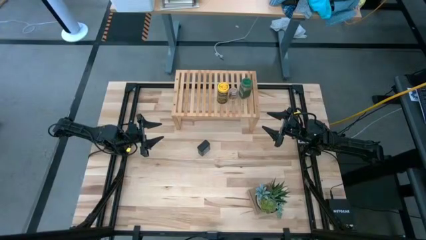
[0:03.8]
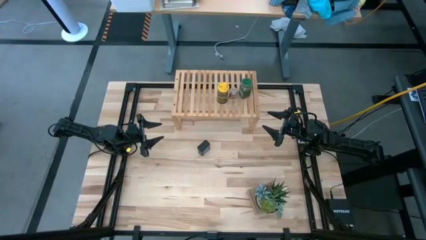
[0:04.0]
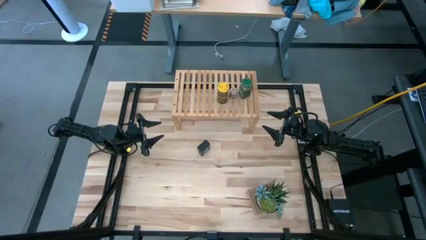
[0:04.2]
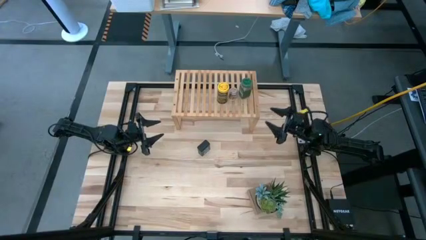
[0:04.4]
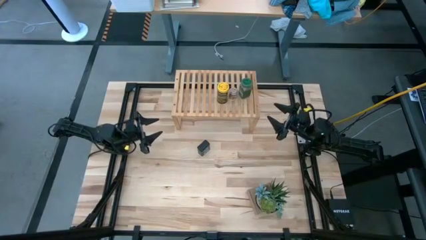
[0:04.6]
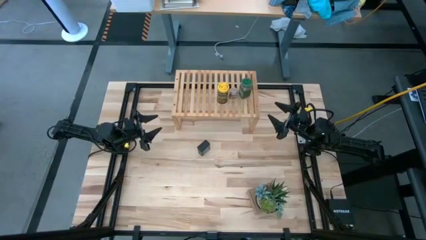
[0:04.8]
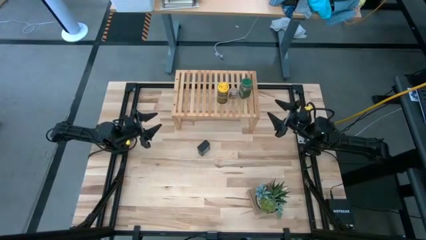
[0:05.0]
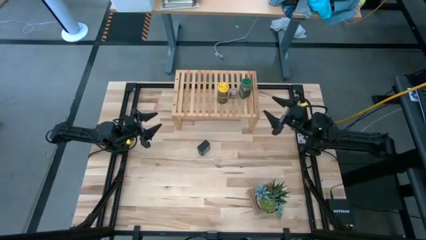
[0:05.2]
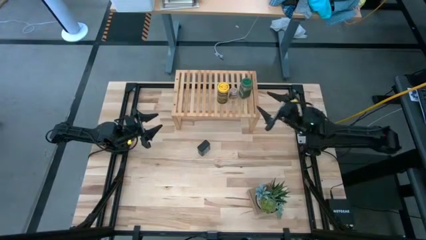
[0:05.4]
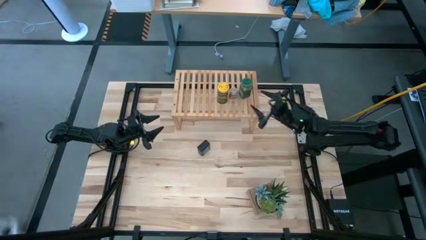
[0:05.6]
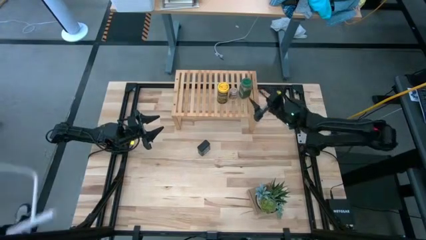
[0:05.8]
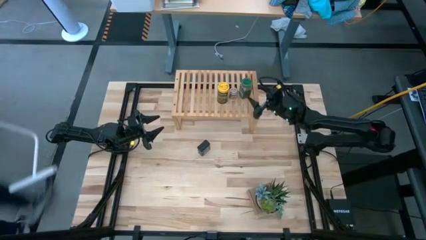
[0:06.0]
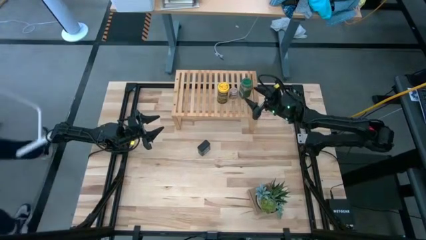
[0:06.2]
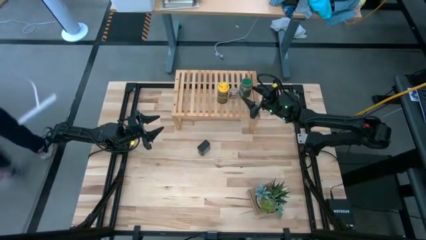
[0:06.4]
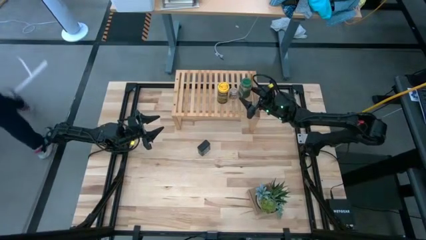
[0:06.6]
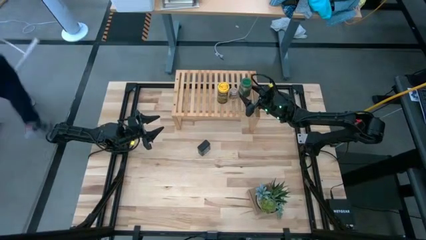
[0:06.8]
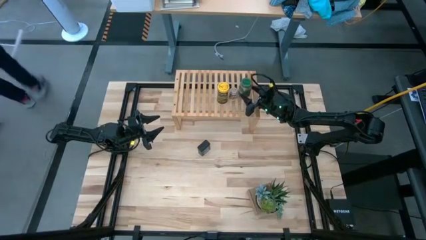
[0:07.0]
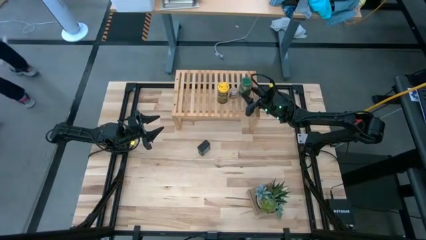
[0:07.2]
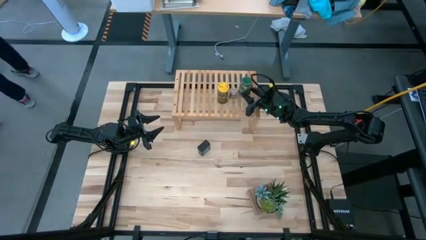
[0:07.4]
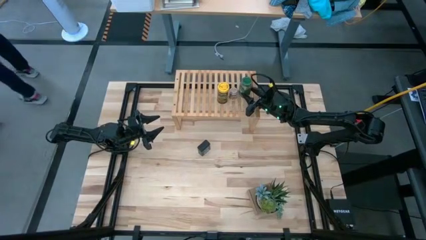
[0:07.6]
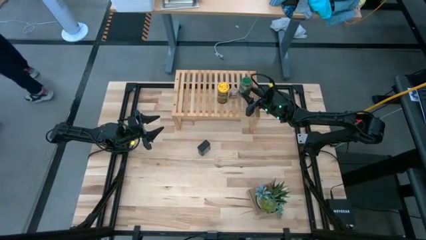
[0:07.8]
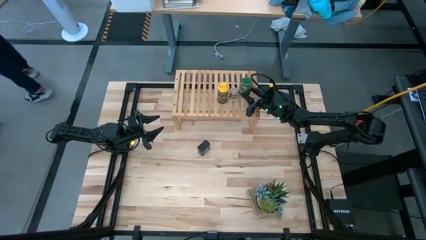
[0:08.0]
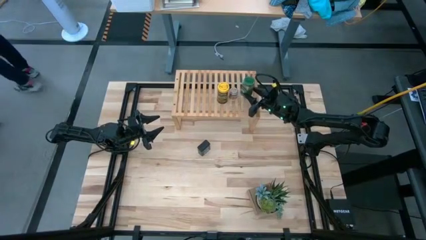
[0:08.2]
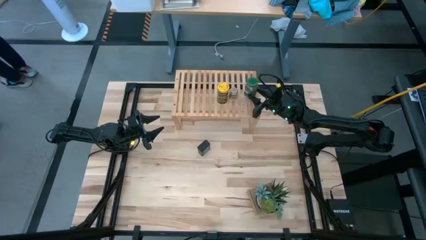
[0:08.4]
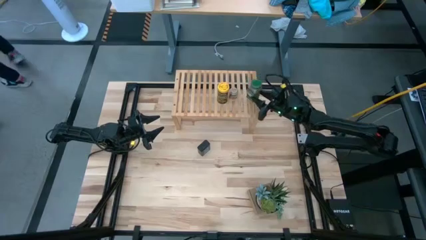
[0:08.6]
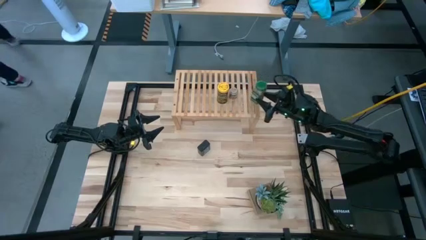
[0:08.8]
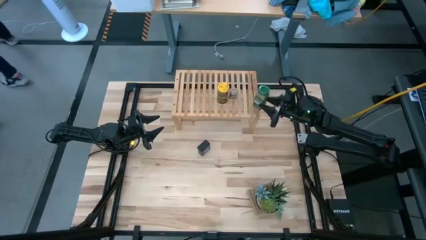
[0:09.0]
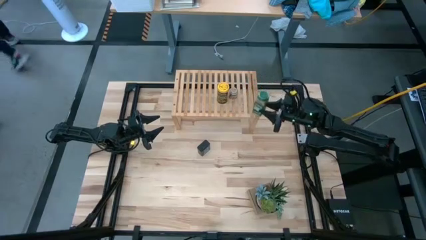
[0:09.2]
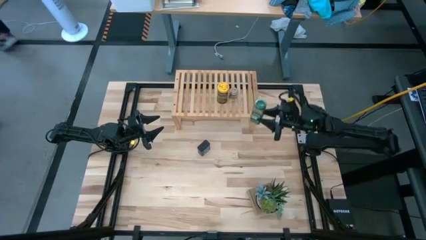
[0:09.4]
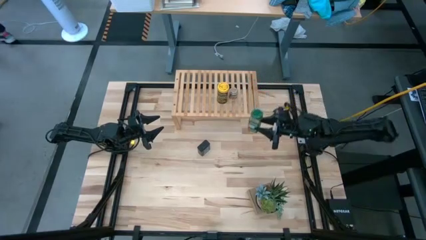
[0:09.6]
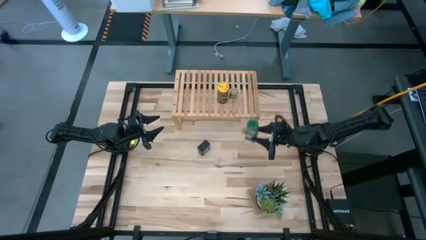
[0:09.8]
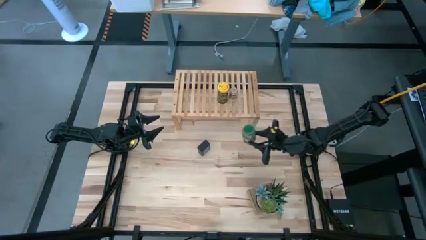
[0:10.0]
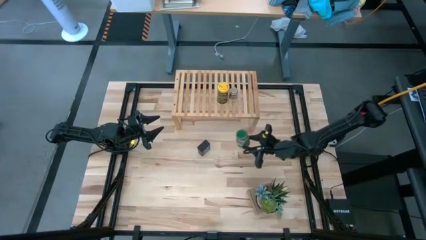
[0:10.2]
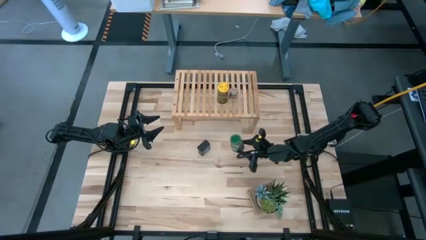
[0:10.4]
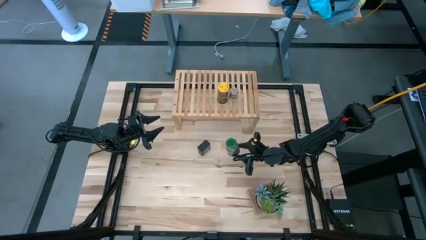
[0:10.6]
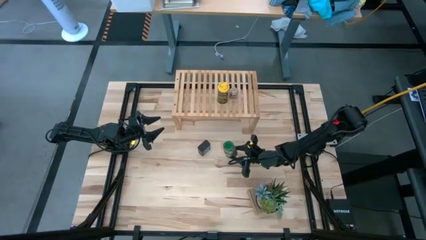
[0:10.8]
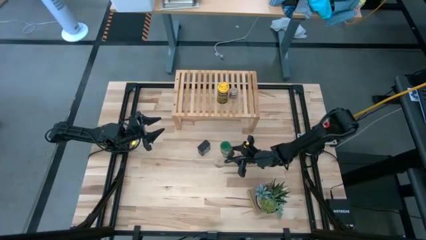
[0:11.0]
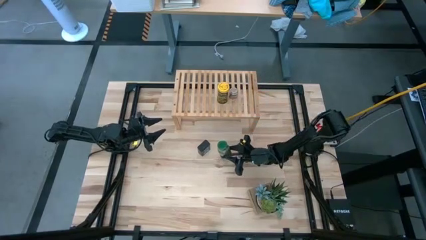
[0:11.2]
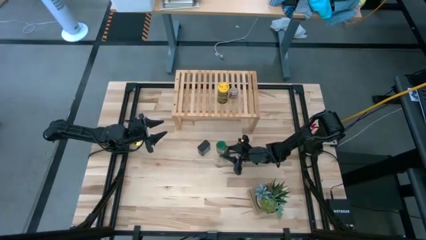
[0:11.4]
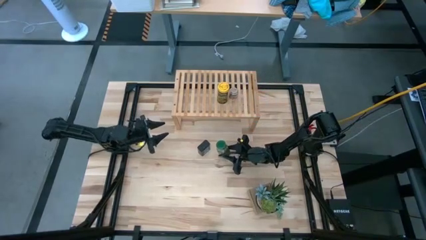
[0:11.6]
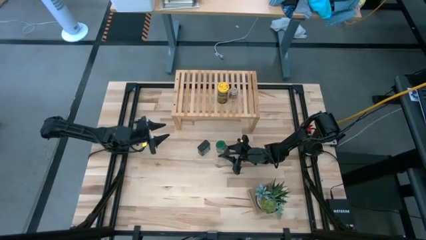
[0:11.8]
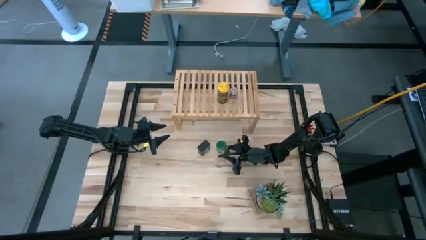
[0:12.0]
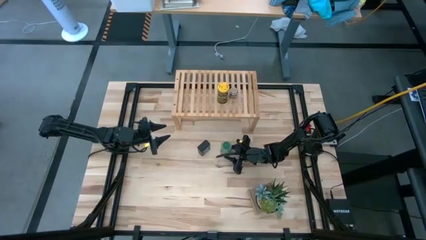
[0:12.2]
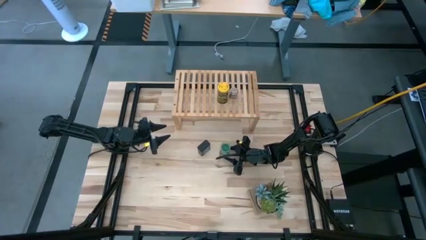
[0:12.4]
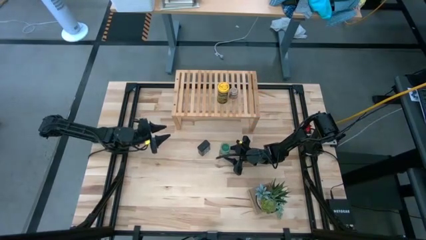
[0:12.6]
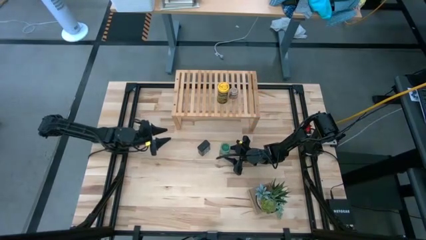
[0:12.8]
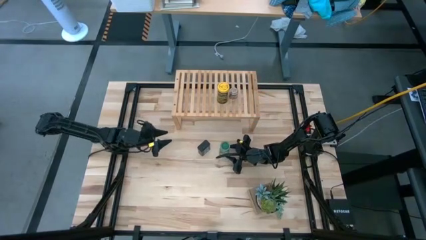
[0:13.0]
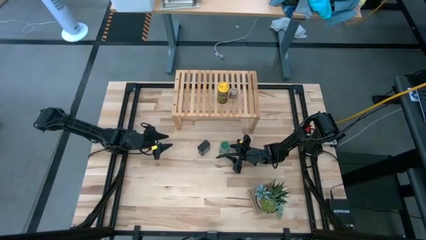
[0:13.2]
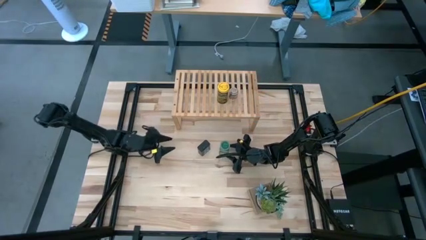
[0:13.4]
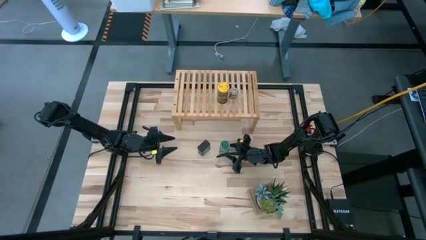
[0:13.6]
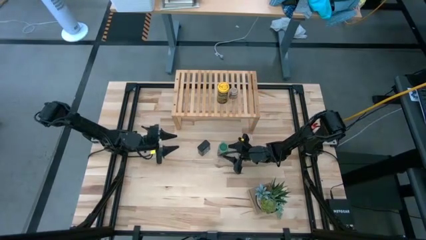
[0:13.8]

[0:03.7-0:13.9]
Task: Shelf spices
Remove the green seasoning bottle from the shelf

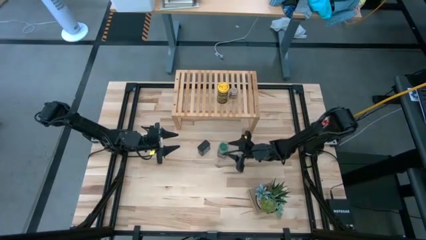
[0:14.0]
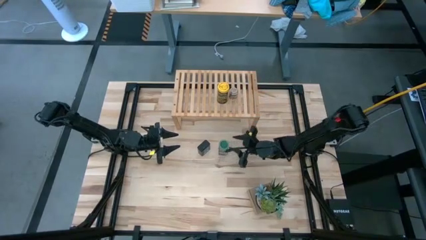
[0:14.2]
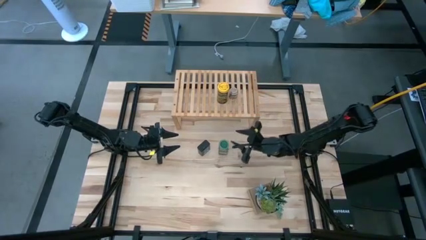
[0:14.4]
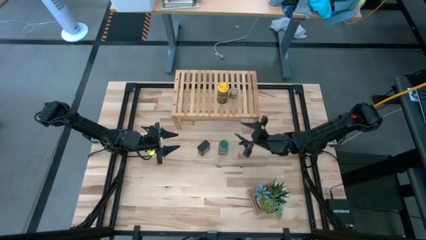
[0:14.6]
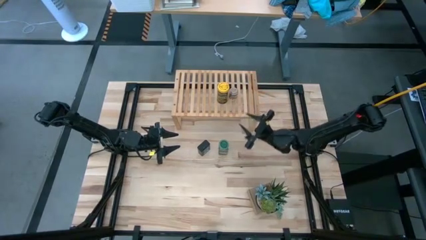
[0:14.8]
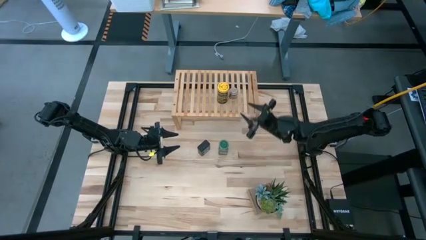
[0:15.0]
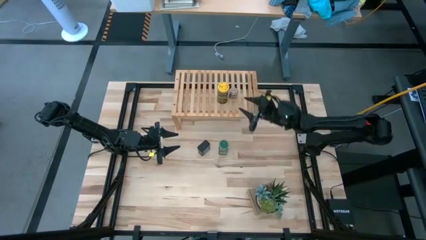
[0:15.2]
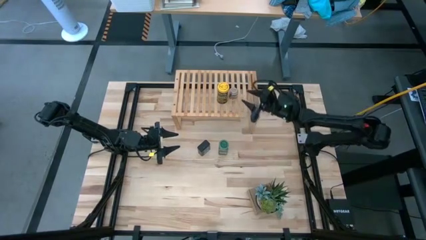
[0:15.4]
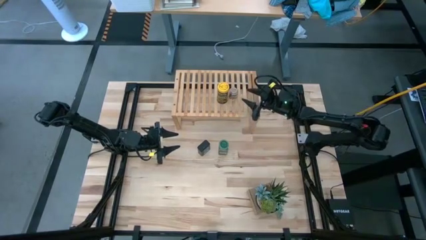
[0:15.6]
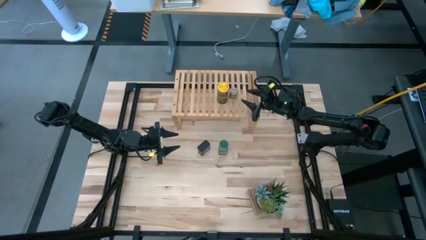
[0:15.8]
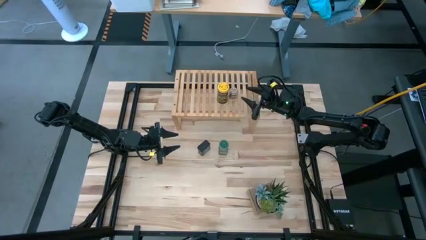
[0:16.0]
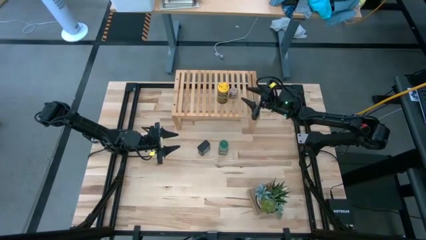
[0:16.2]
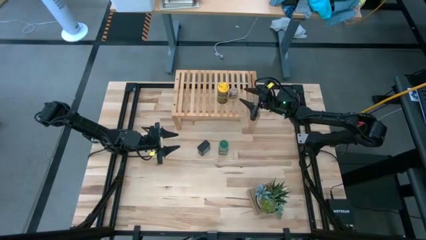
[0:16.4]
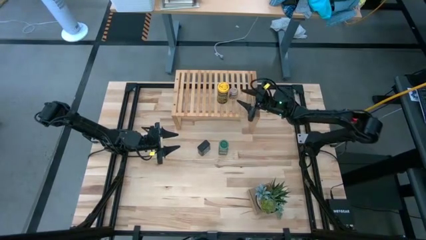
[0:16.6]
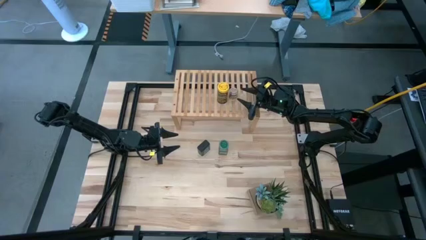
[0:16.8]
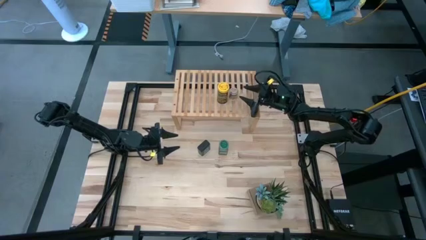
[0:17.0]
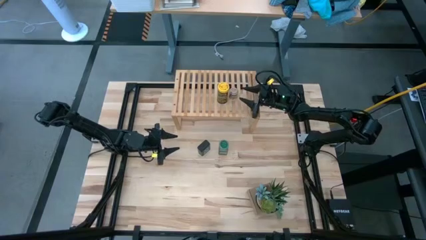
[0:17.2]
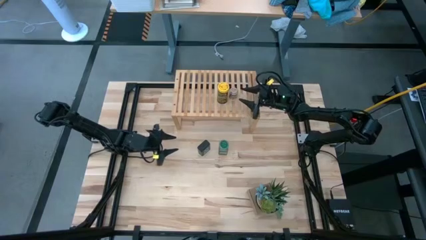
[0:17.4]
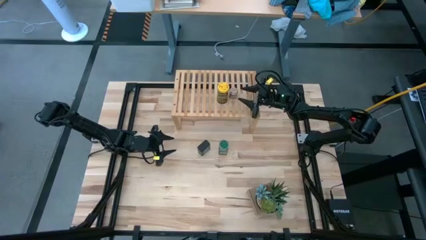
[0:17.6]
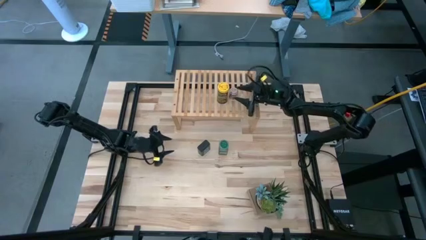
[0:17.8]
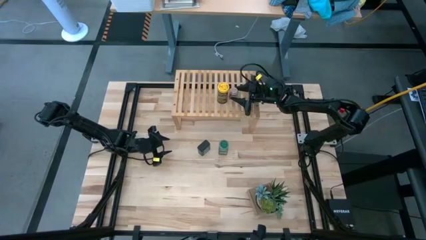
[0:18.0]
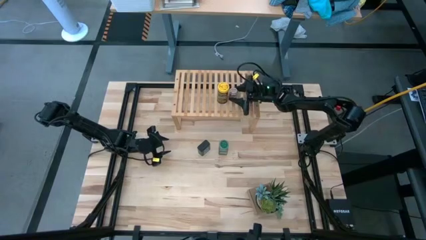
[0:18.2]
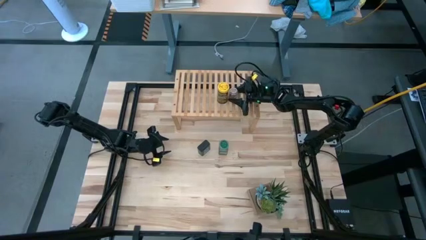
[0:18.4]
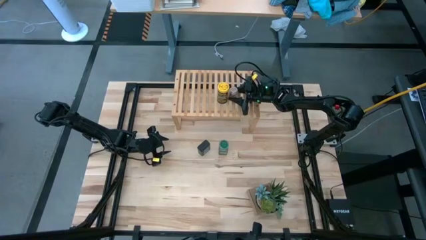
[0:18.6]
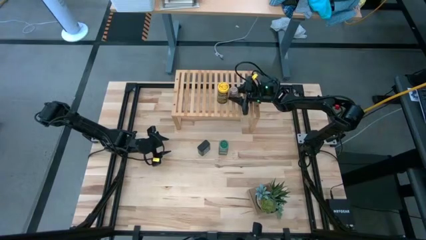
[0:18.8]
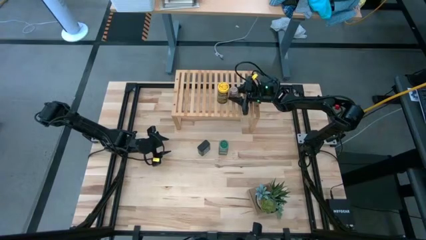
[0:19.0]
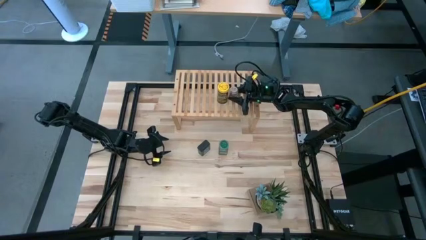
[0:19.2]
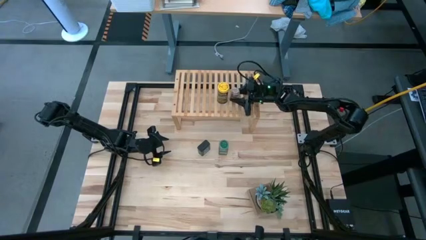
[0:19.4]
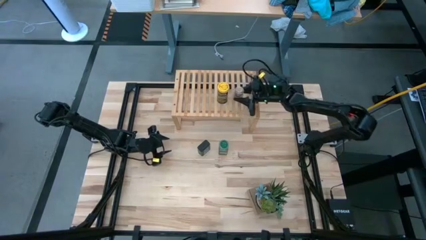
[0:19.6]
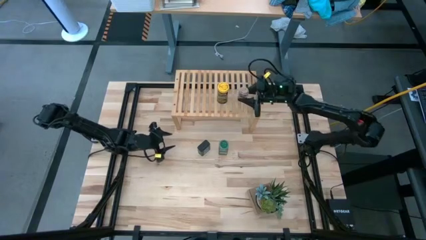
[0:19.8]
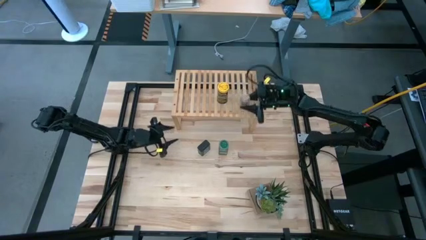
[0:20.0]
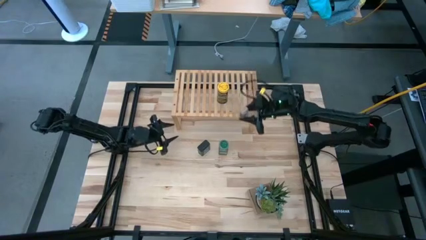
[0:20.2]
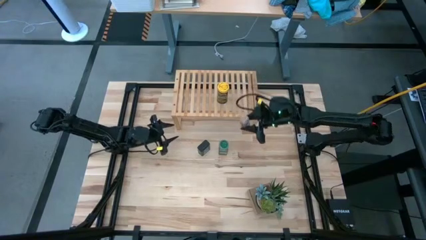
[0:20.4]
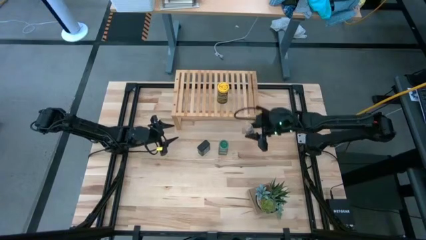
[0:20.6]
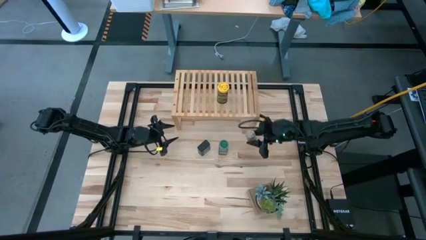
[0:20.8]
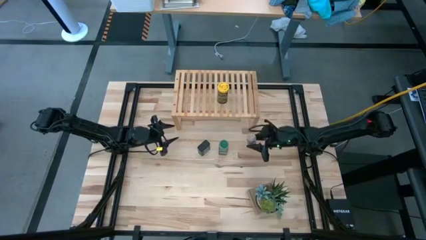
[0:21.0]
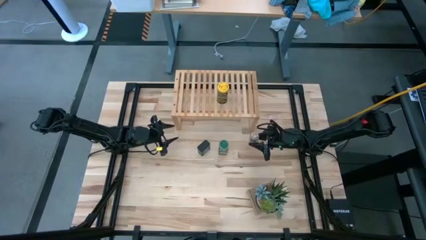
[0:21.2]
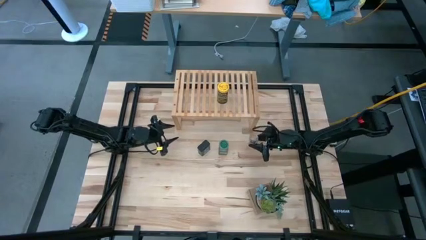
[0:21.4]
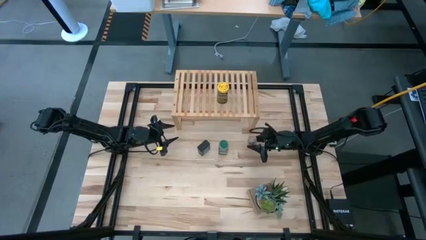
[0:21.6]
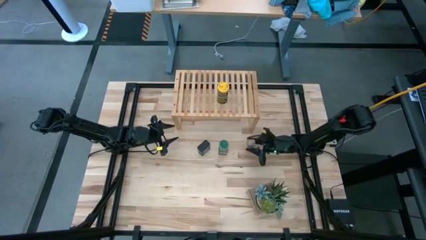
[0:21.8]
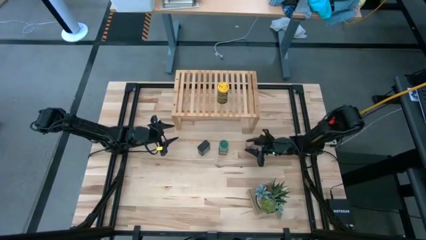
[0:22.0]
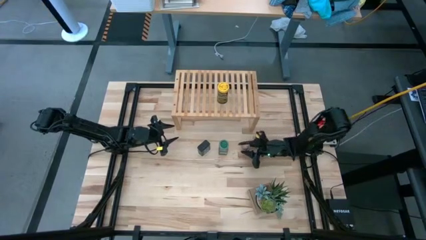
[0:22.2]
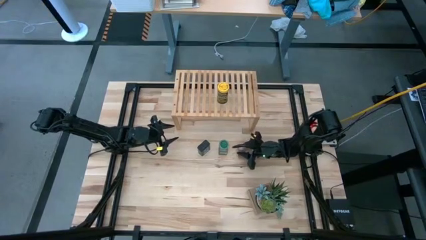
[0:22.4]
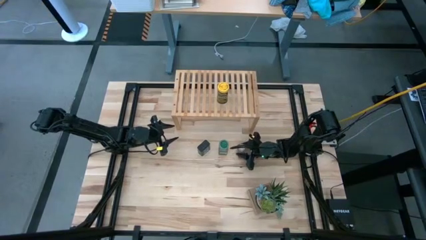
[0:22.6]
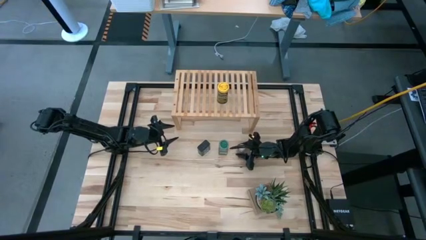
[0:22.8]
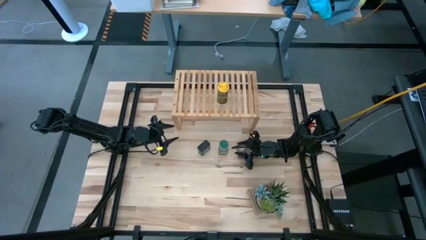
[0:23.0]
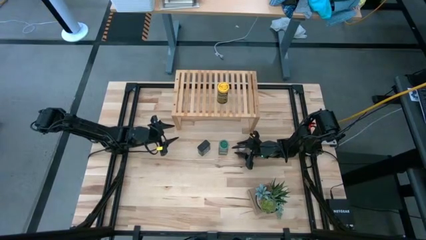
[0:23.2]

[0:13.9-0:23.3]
Remove the small brown seasoning bottle from the shelf
